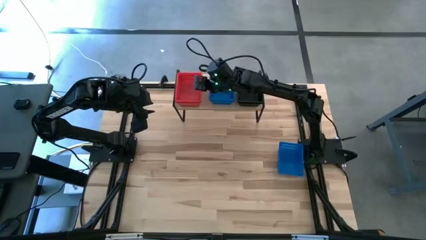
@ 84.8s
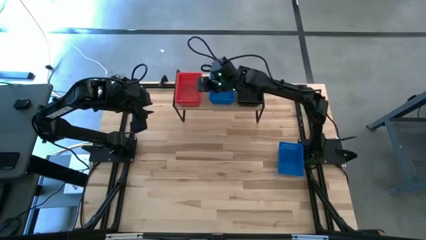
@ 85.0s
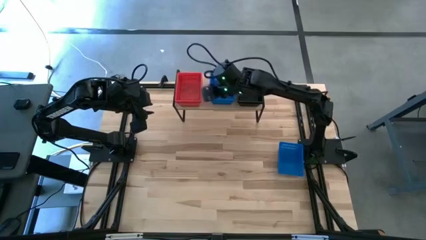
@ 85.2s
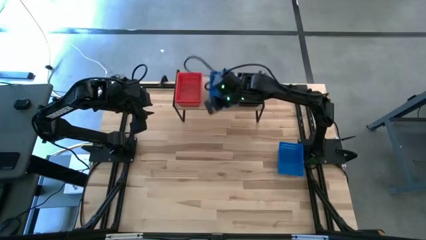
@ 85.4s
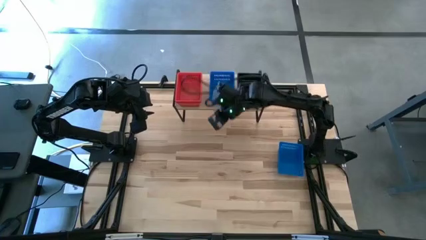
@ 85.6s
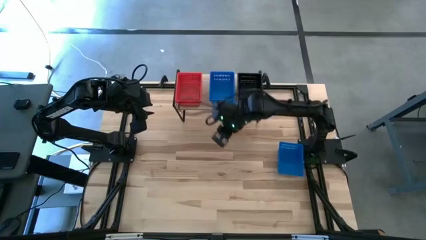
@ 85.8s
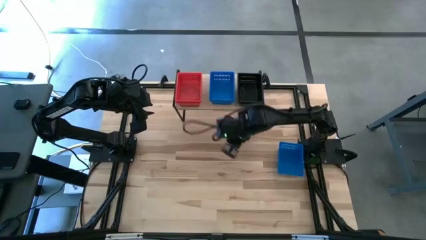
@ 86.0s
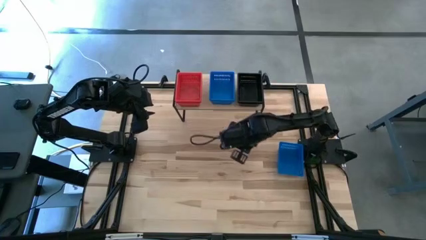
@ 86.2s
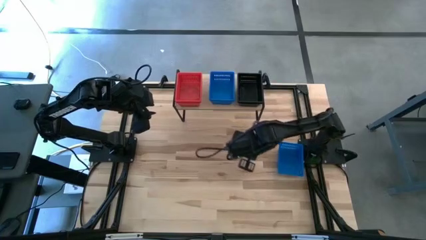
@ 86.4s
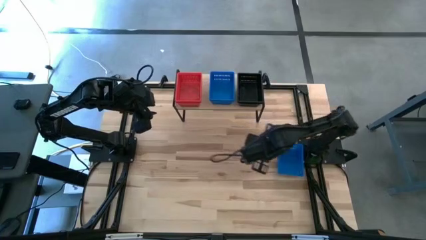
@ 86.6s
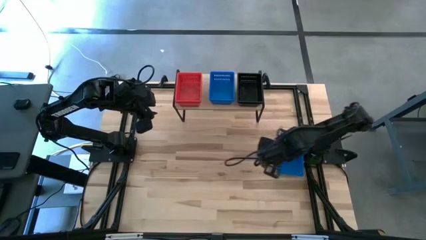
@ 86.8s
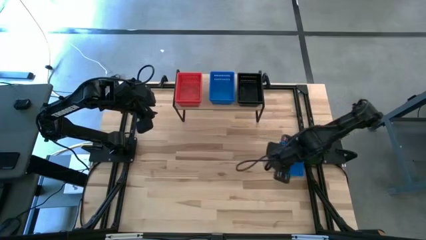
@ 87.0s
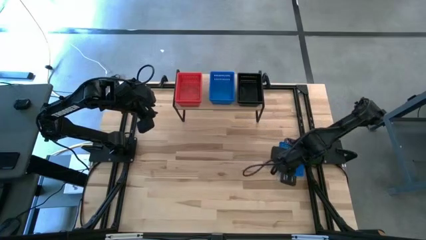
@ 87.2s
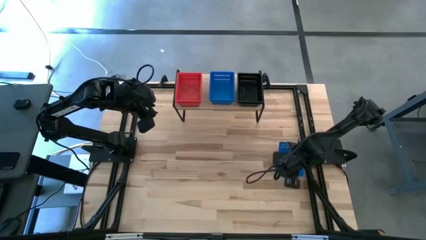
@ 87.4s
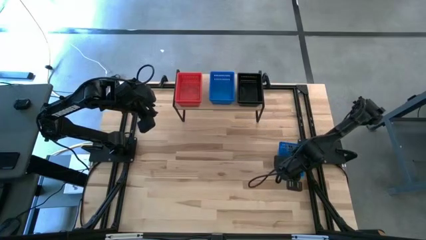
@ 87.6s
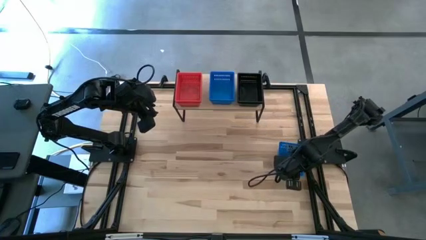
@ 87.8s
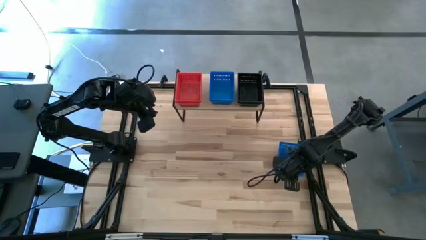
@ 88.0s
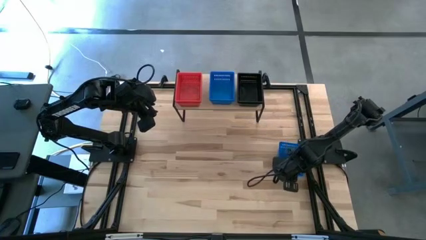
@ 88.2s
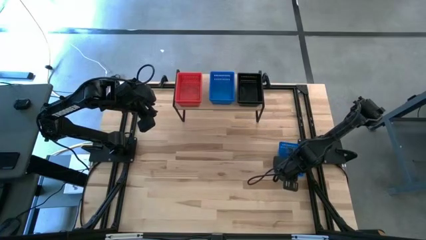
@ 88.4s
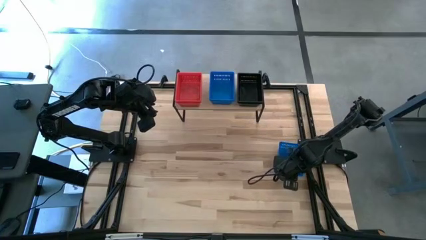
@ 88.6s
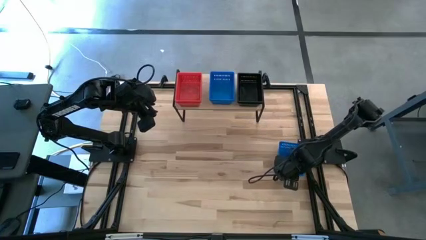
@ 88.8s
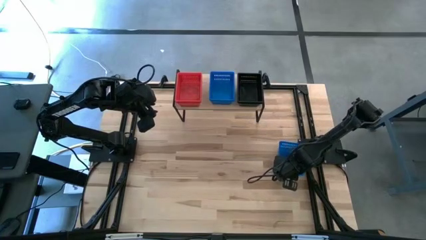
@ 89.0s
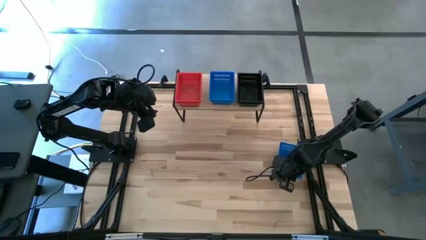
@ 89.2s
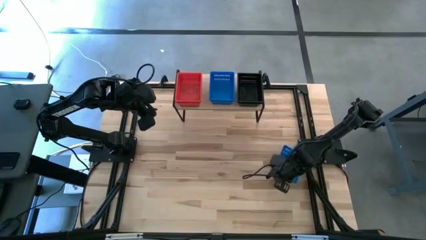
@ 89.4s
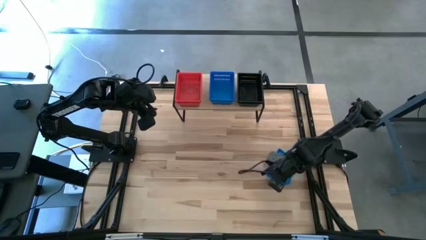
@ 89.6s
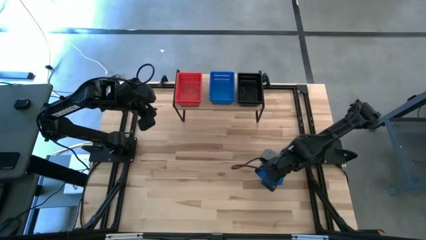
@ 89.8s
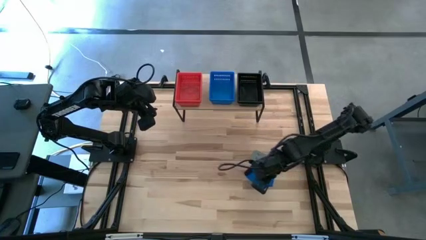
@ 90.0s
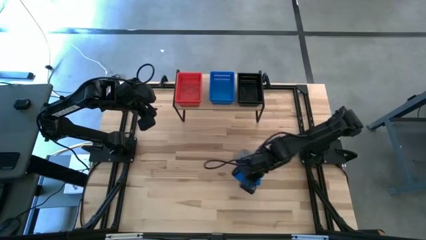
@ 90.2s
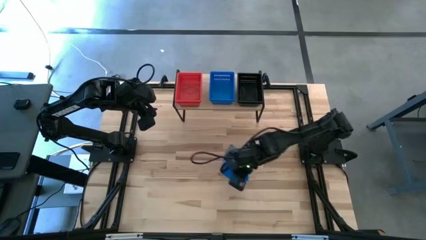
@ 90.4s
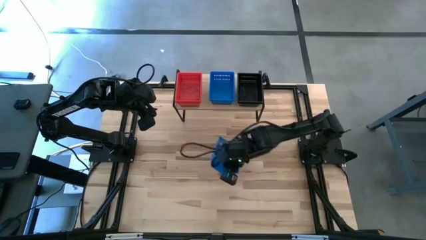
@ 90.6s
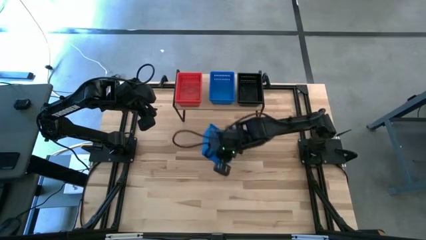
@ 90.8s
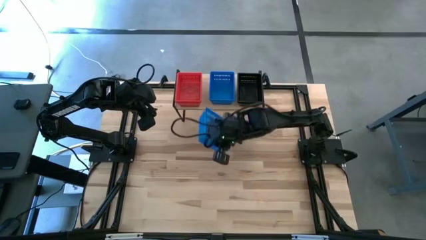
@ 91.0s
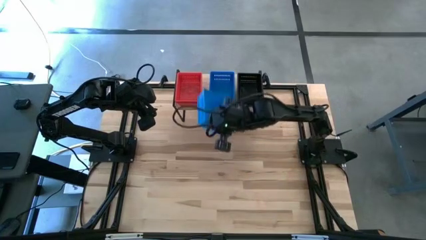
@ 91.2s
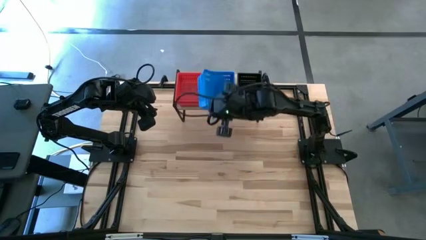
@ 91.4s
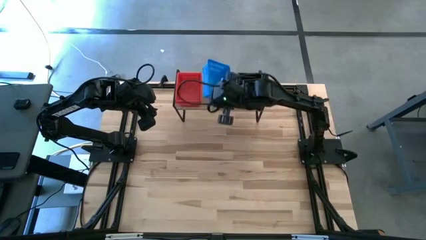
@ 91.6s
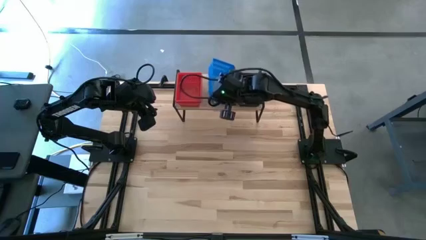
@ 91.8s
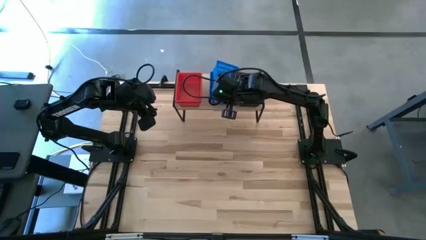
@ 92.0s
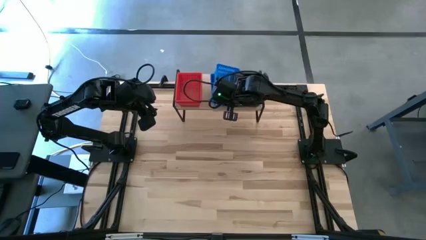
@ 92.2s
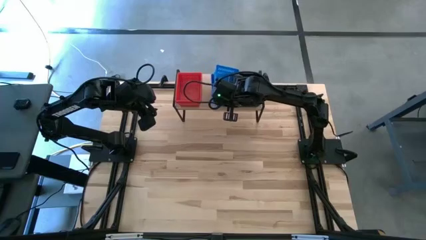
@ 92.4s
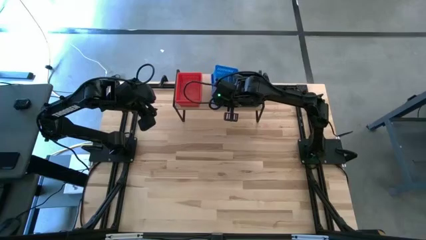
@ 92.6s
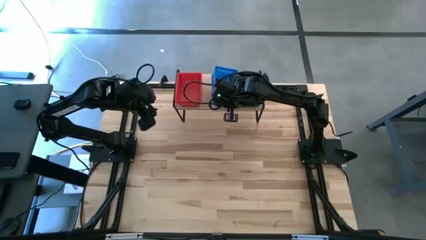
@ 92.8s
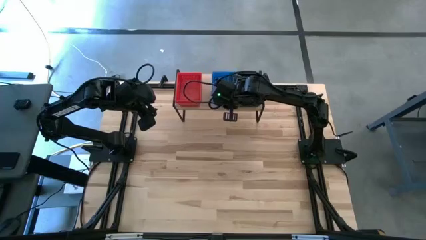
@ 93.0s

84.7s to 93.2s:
Task: Stack baskets on shelf by color
Stack the the blue basket on top of the blue basket on the shelf

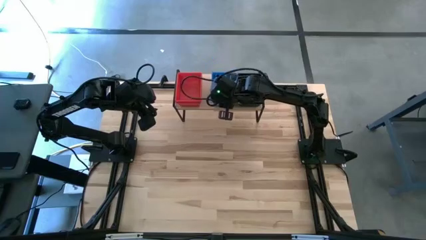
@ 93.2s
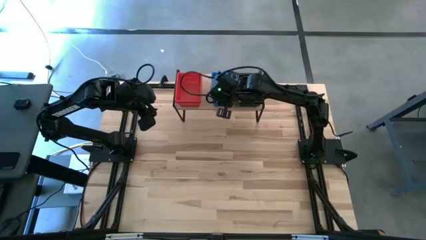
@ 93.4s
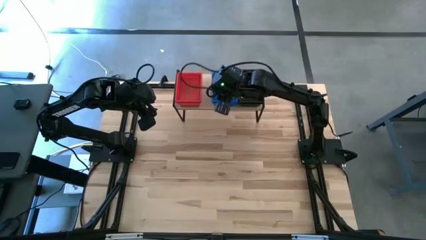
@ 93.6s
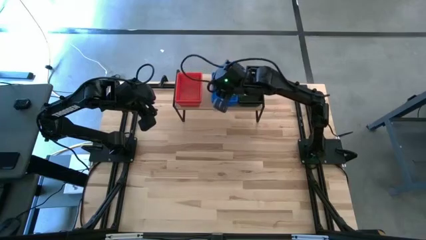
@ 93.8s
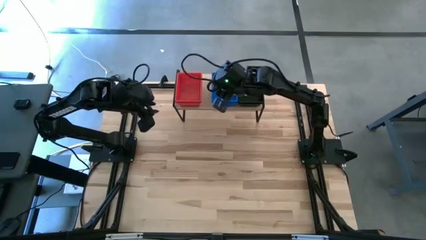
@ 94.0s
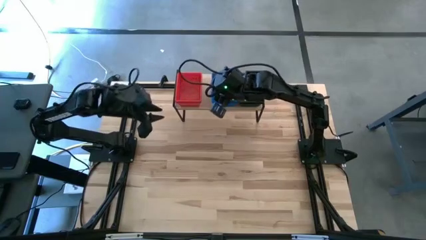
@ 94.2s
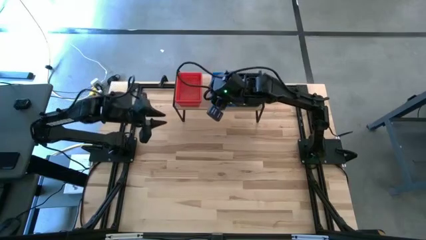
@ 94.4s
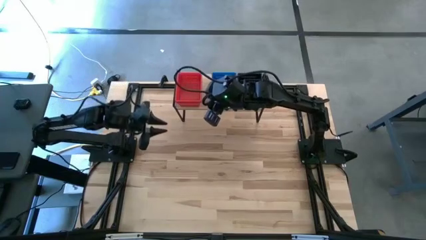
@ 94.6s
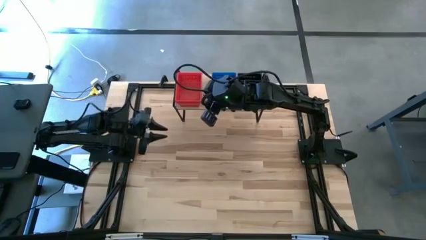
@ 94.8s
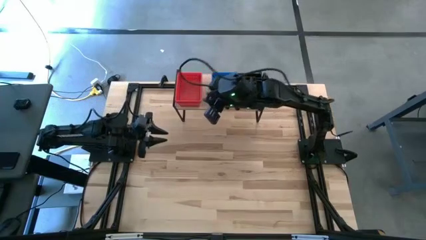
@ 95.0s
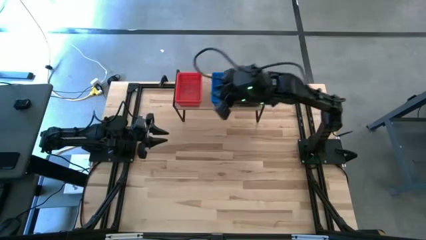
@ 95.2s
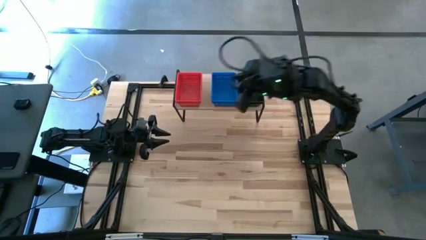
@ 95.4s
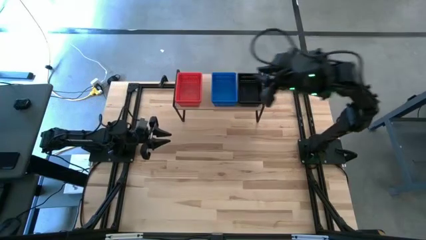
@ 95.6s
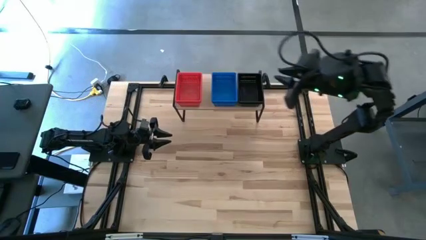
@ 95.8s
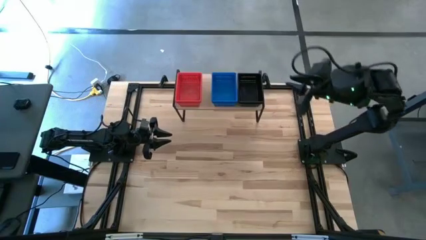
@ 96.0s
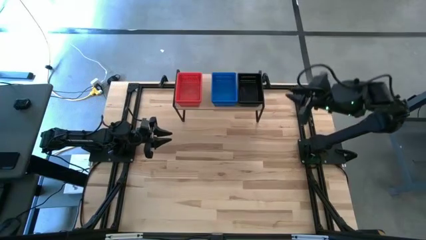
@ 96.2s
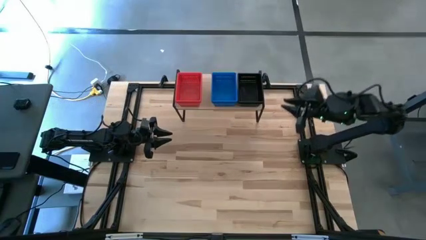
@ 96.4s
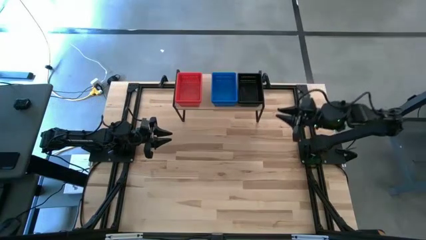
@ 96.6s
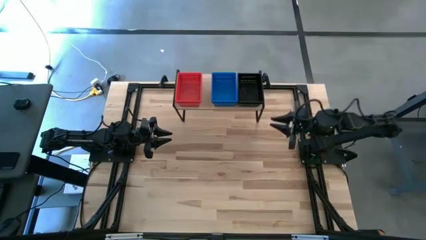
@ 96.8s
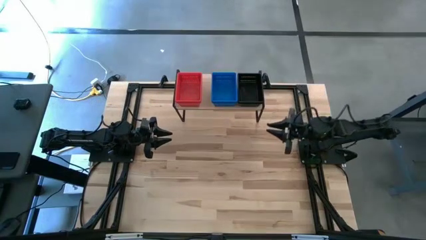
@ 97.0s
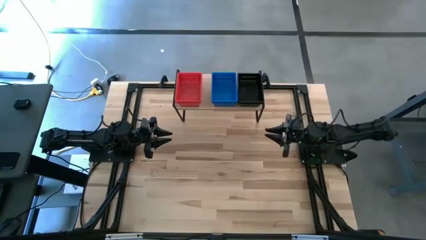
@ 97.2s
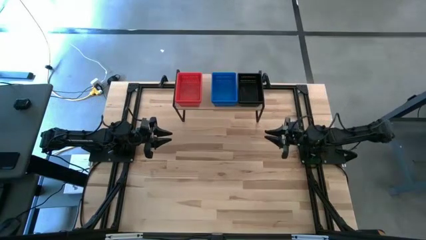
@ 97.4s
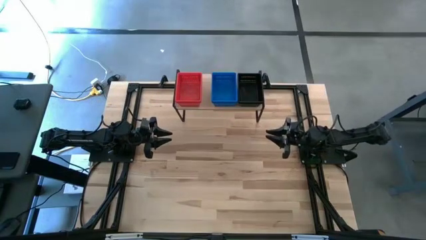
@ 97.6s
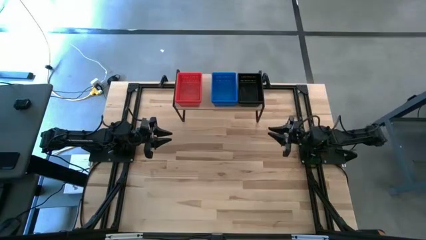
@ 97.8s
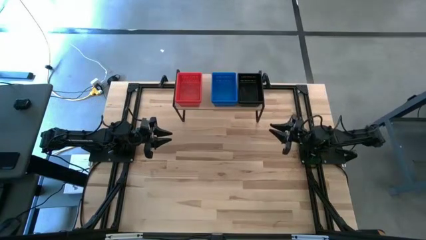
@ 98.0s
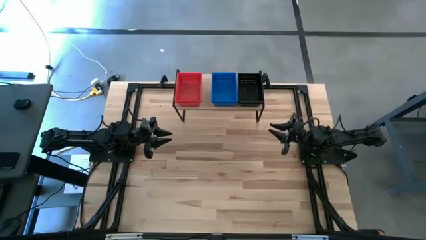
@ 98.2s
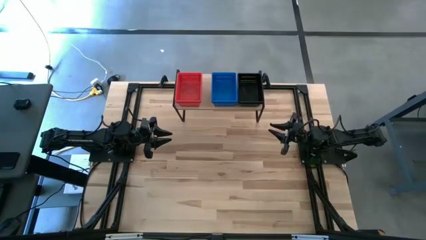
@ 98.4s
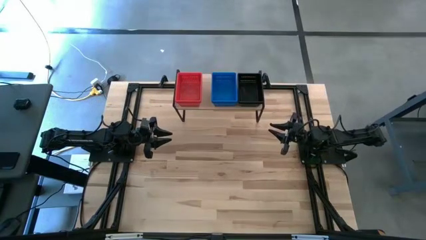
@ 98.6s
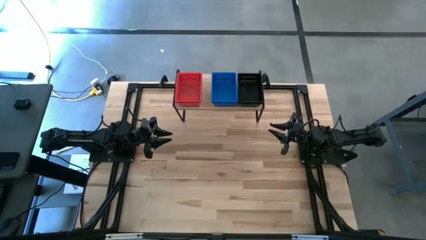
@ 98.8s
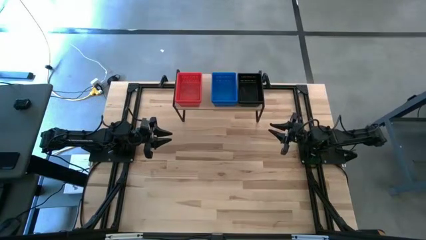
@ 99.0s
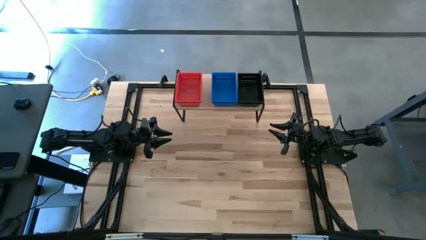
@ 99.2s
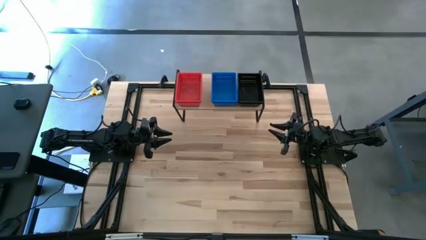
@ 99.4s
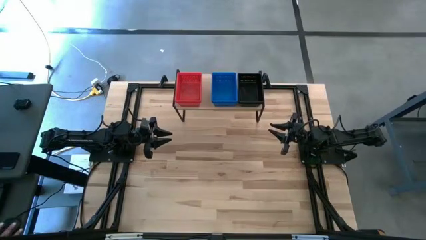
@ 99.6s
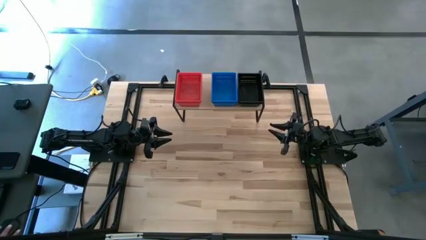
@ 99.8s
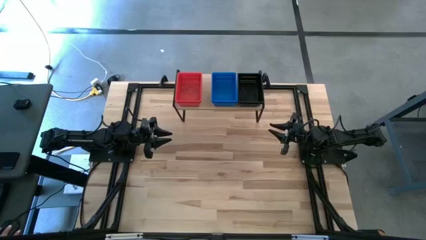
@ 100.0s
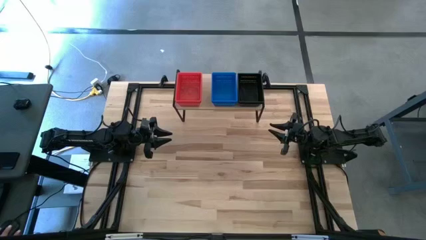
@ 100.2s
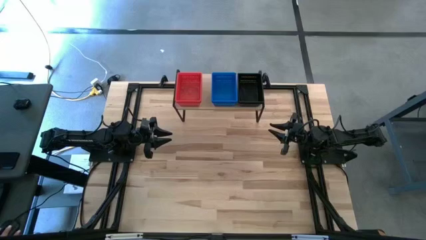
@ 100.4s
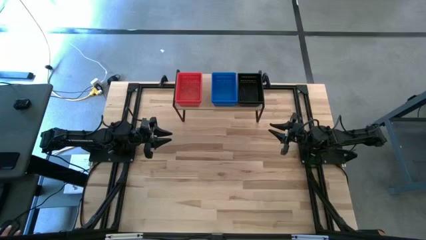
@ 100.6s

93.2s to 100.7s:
Return to Home Position
